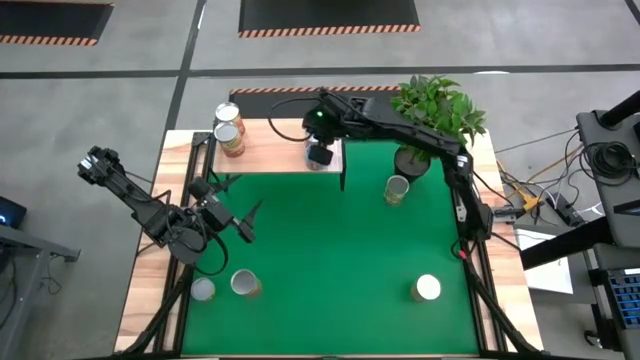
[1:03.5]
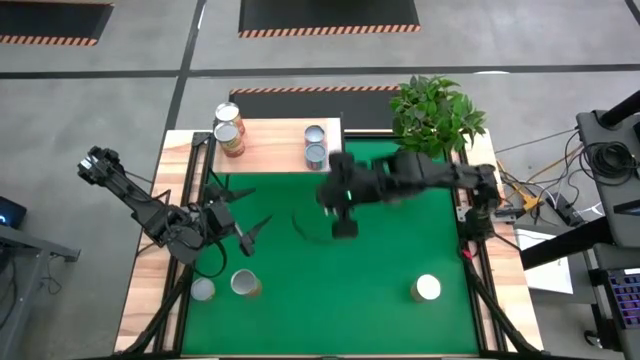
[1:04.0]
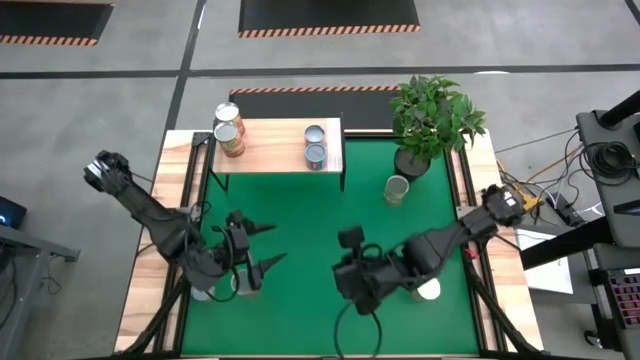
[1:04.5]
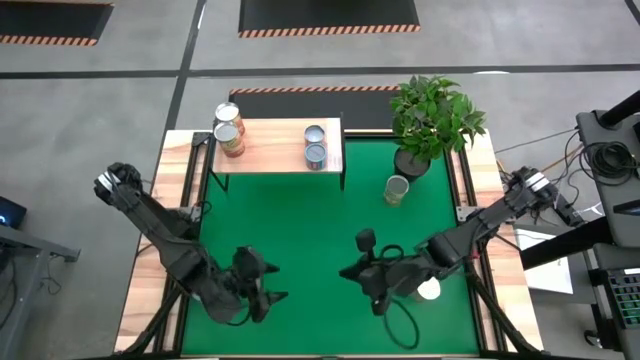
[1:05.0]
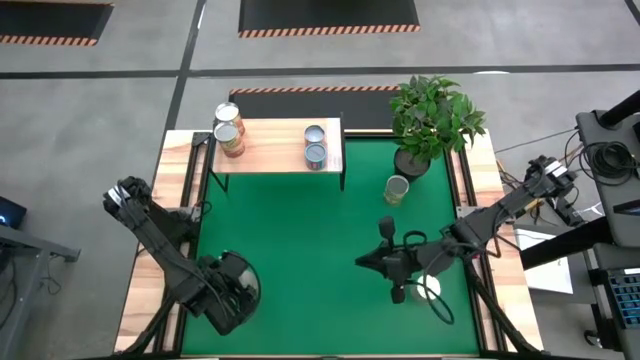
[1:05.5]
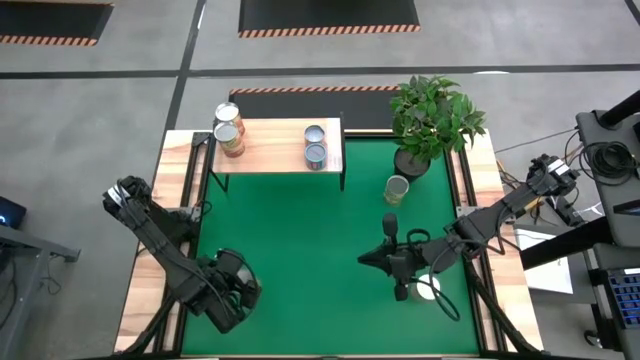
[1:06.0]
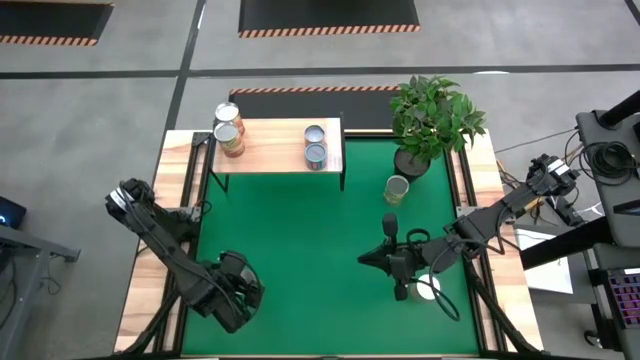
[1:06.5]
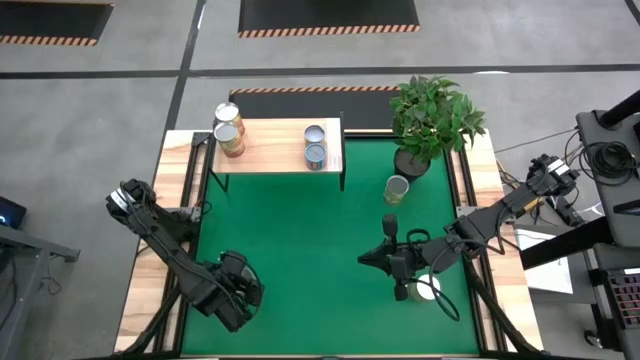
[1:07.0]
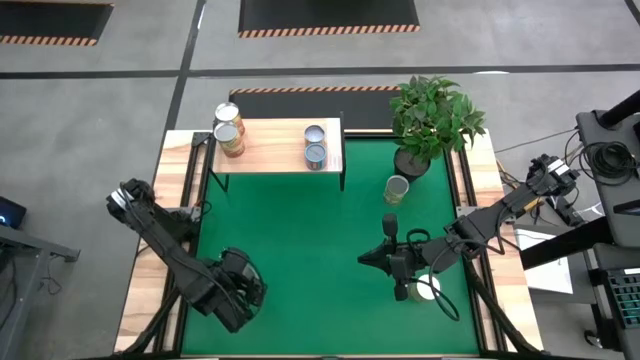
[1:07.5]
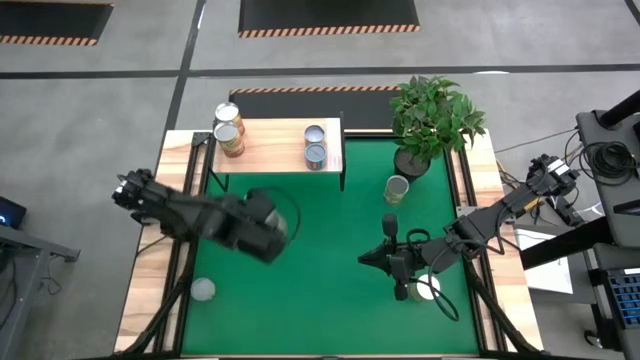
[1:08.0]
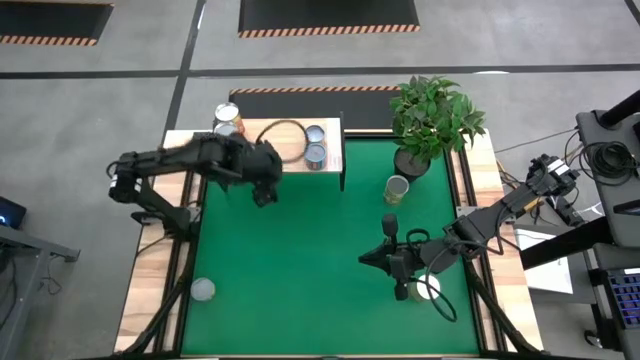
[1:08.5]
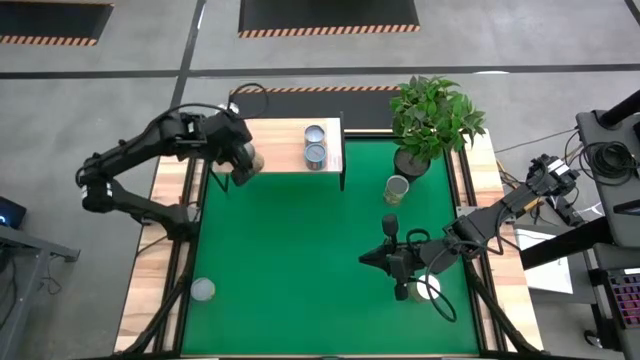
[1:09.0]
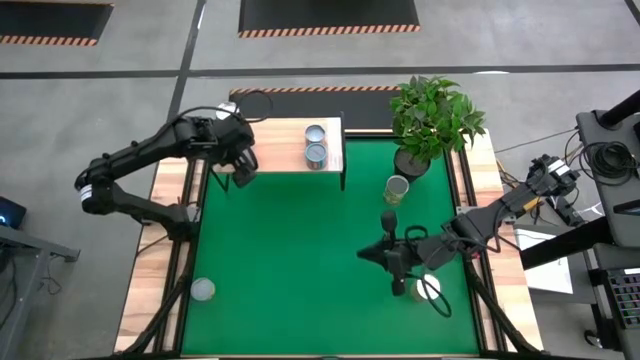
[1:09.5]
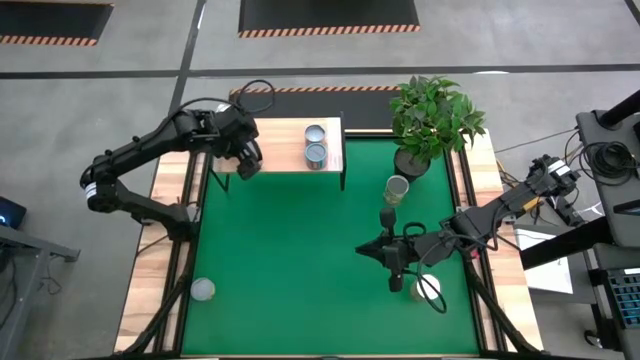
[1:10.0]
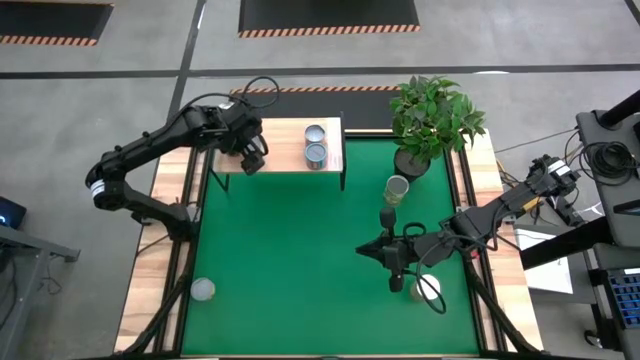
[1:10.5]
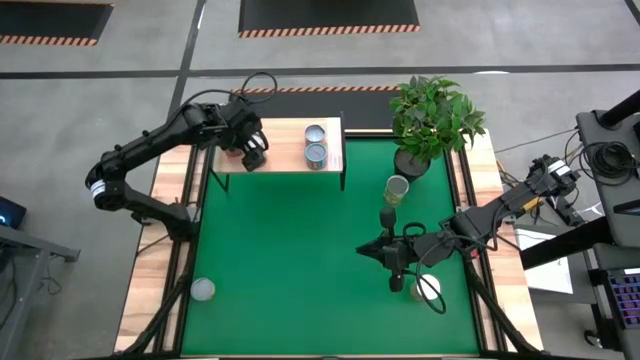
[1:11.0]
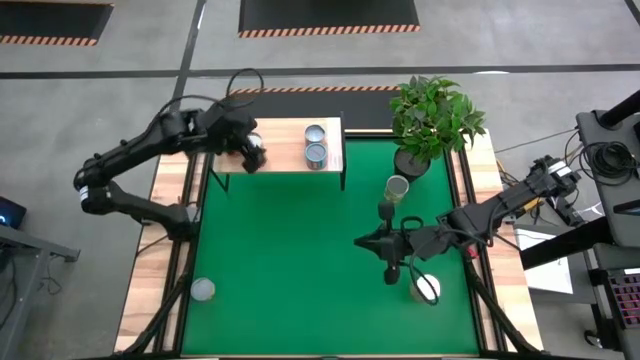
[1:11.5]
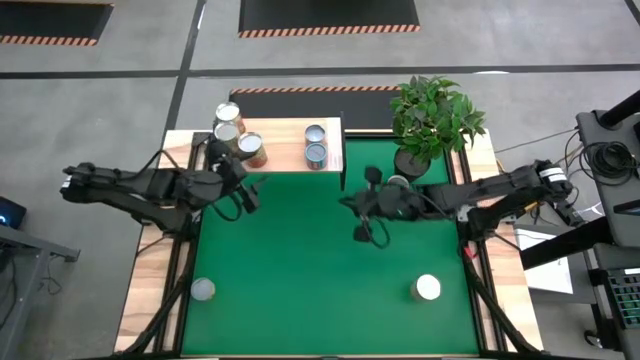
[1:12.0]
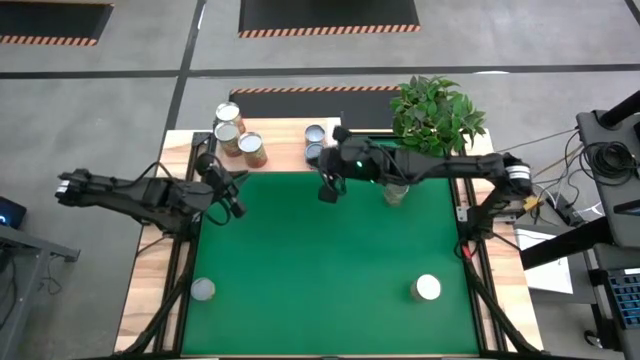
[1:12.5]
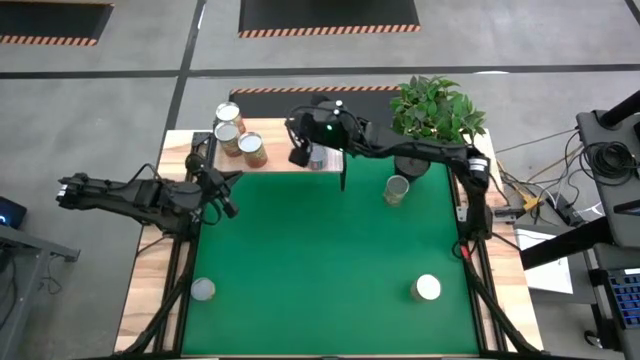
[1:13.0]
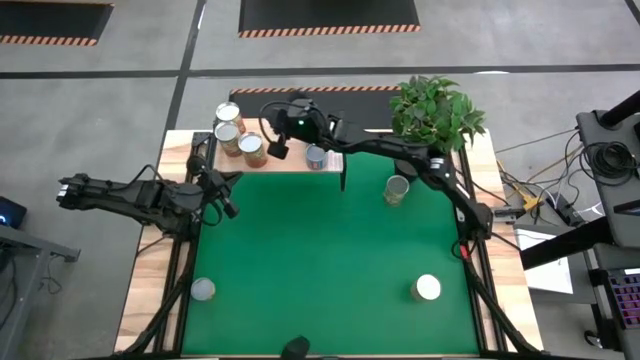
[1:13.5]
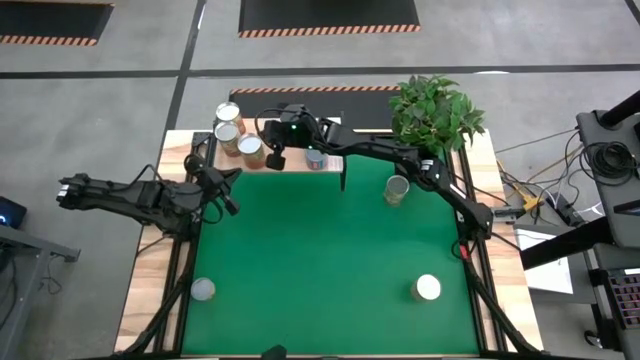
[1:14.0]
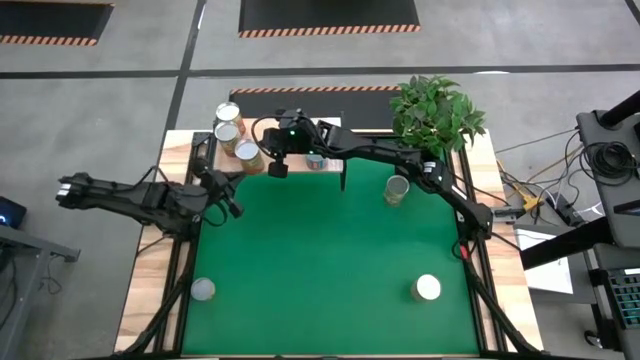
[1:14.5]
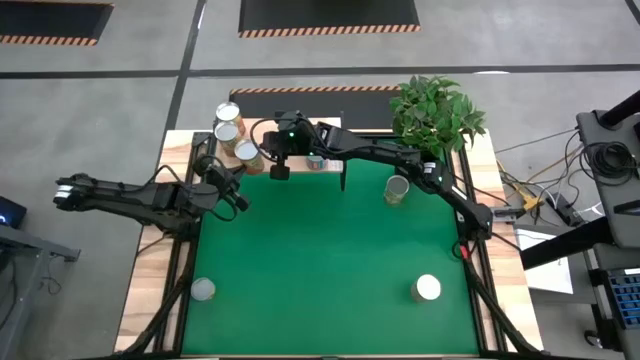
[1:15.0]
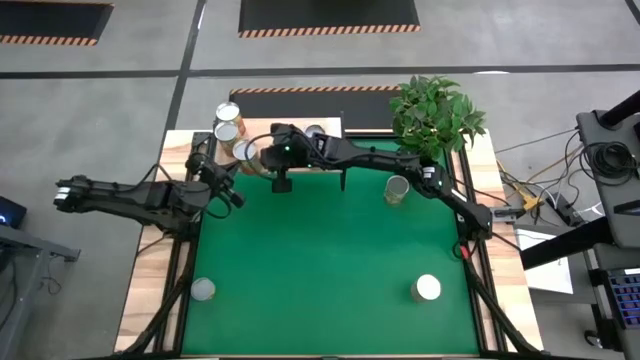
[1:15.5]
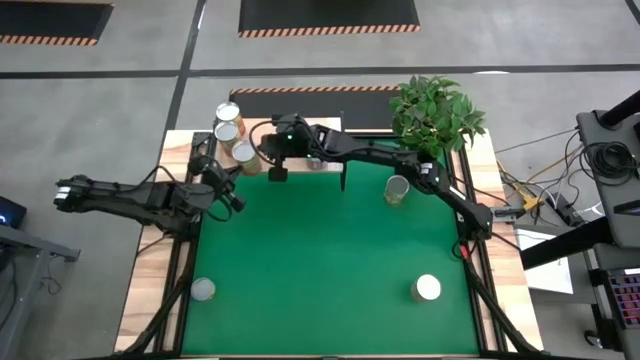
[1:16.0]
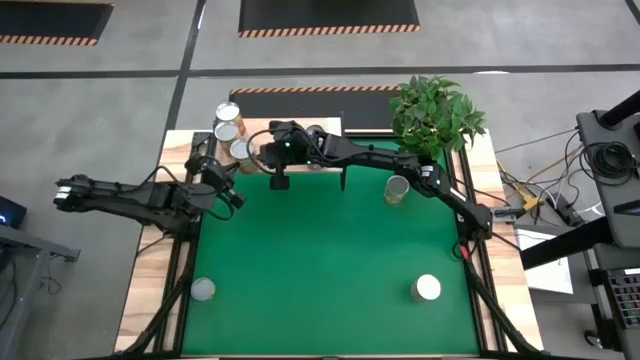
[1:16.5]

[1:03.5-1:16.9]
Task: Pick and place cans onto a shelf
Put the orange can on the shelf aligned with the other orange can

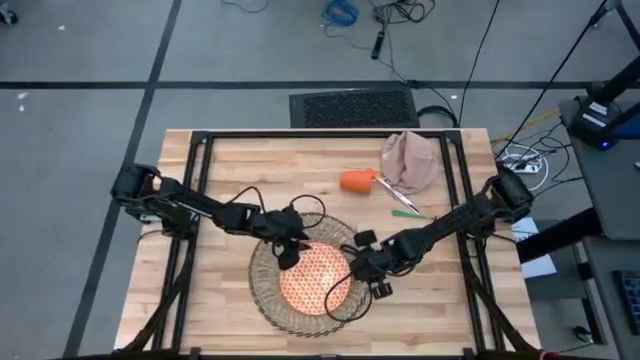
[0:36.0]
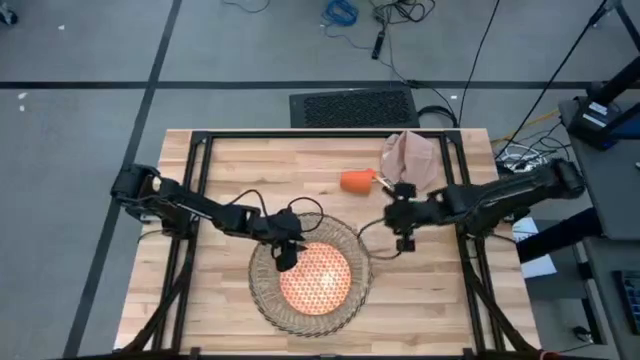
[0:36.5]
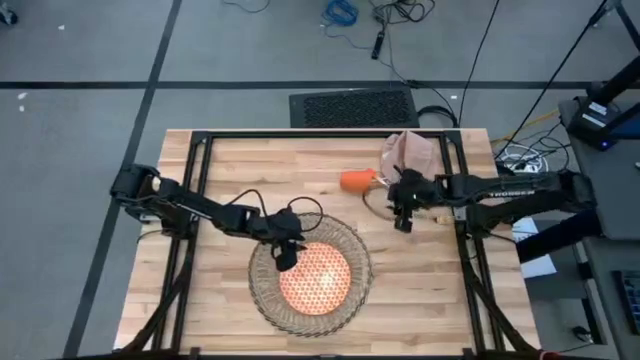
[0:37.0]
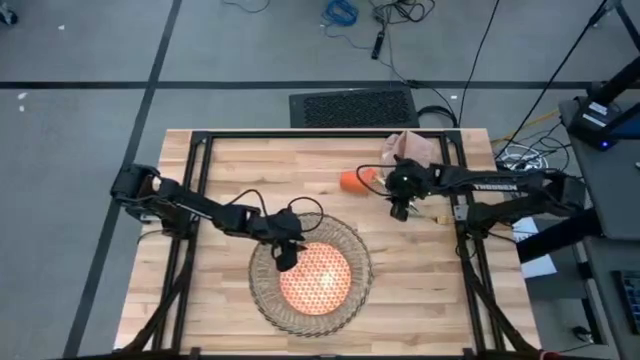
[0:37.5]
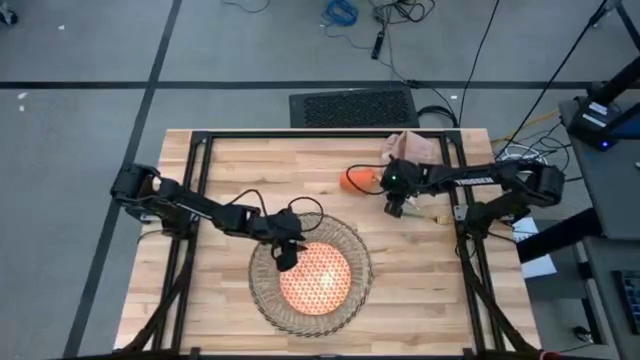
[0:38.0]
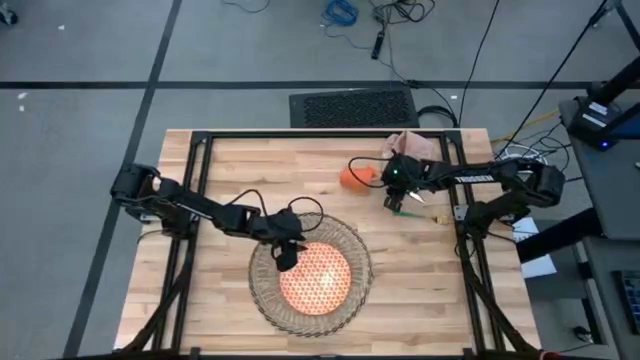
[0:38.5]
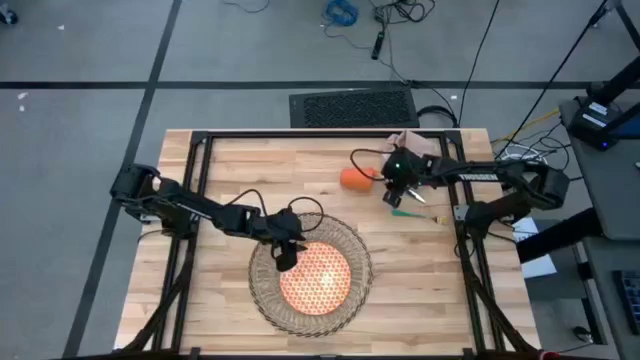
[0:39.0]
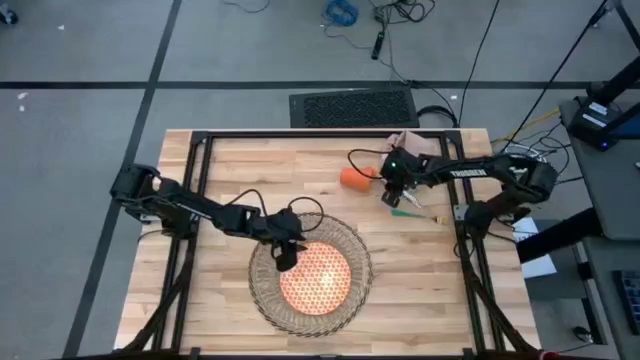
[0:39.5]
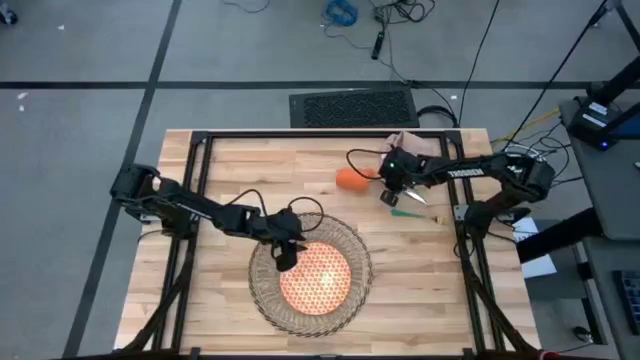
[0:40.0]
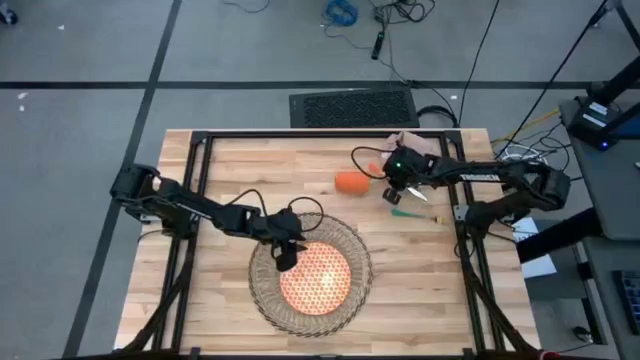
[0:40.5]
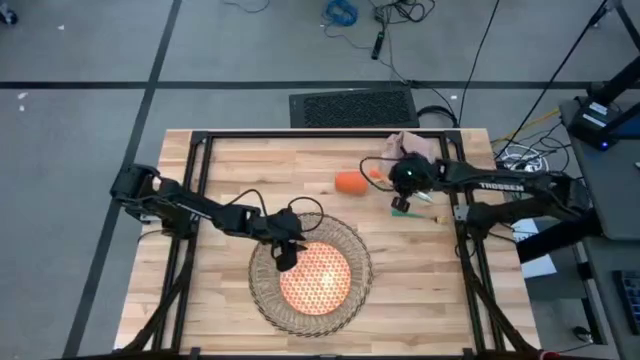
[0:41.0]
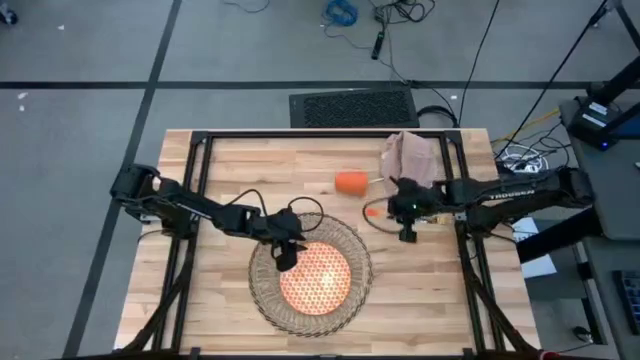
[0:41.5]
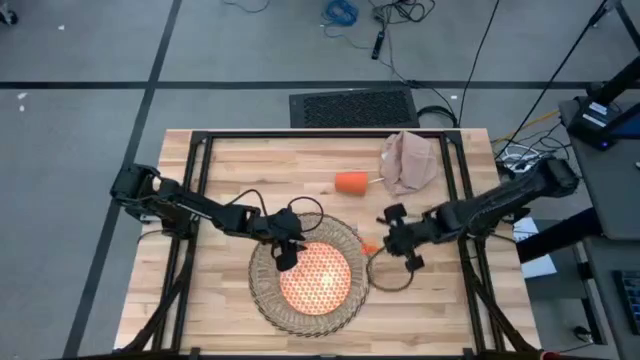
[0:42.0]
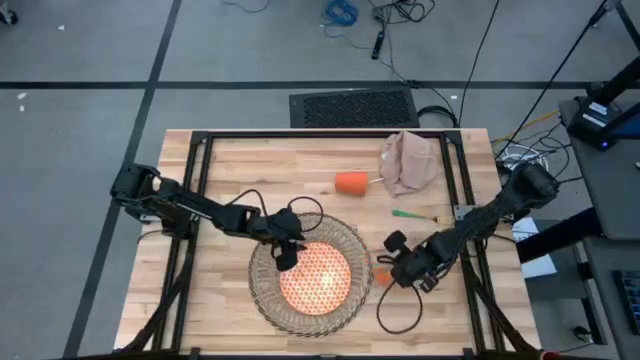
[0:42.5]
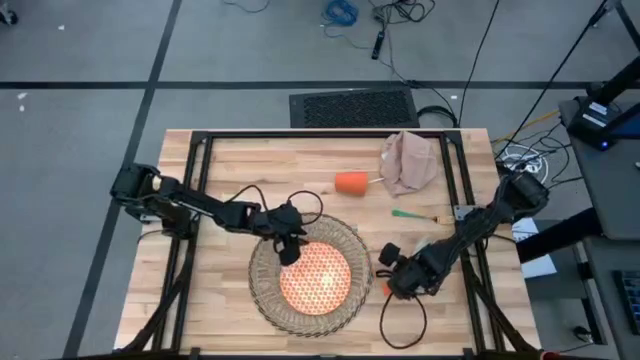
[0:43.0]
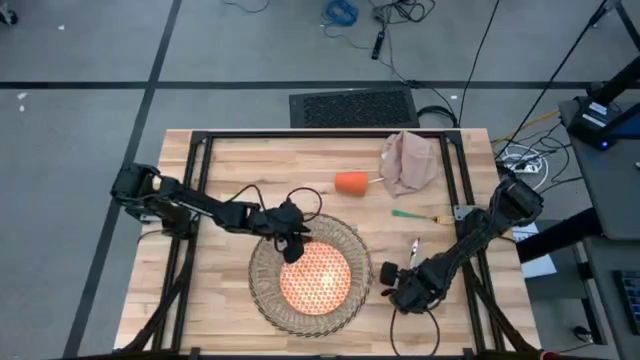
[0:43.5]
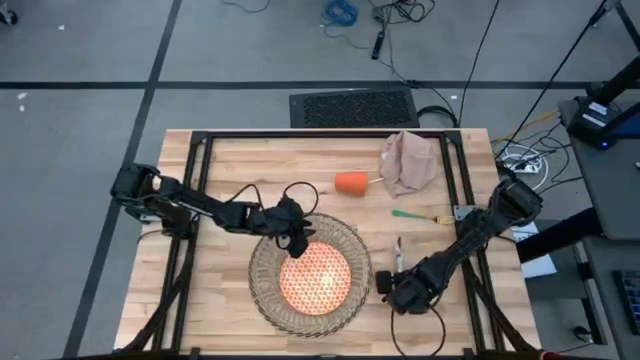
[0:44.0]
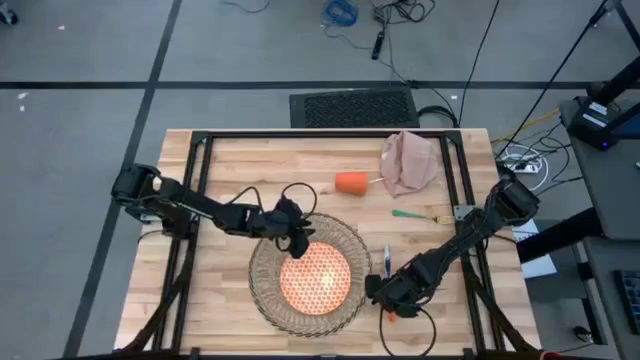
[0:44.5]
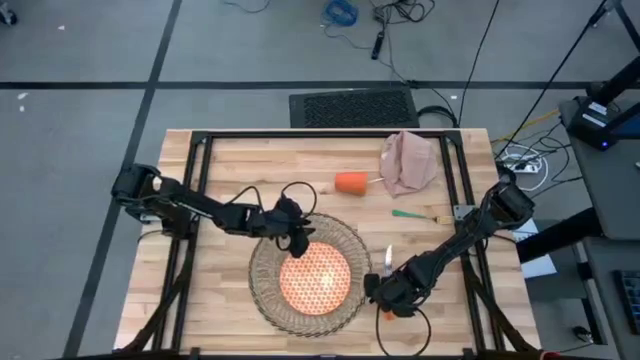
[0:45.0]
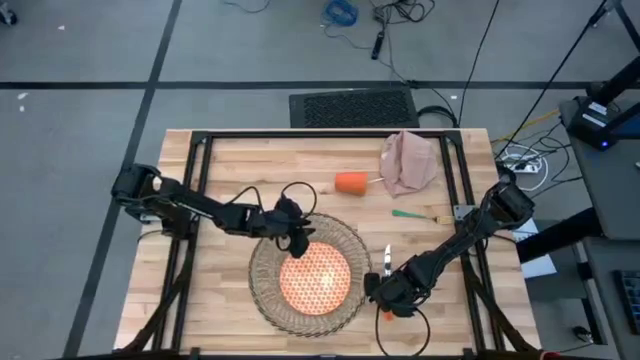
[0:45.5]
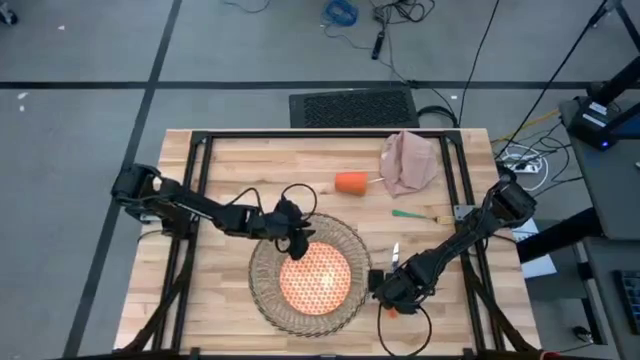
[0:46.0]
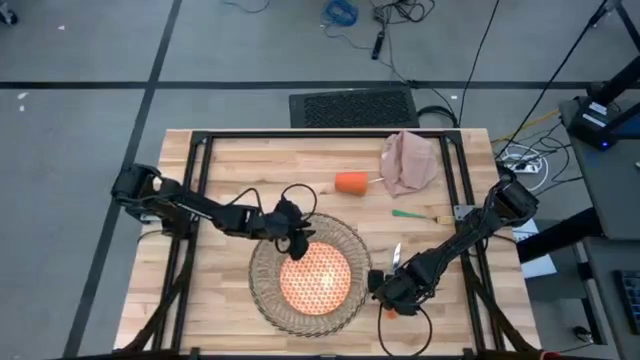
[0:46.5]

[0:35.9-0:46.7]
Task: Set table place
Put the orange knife to the right of the brown mat
